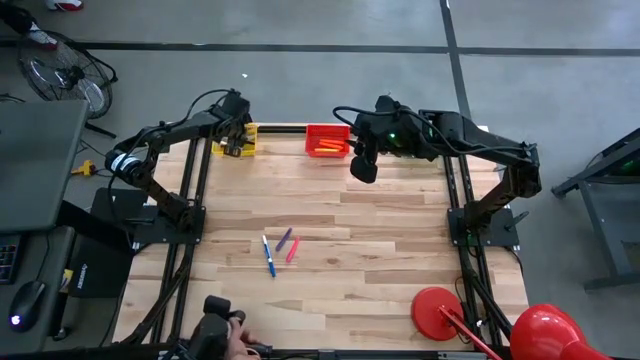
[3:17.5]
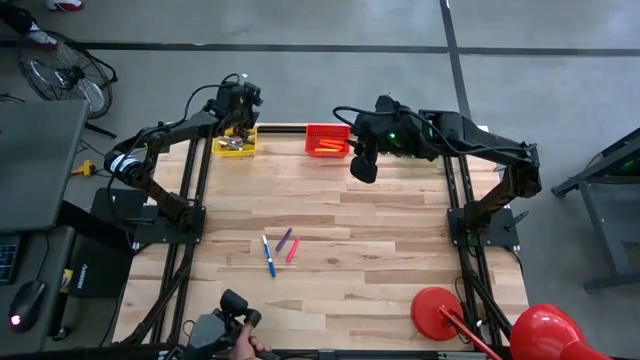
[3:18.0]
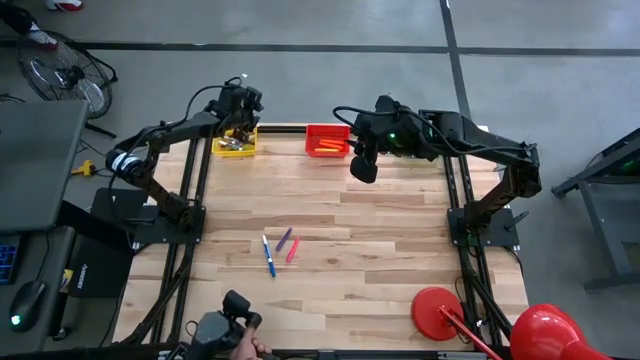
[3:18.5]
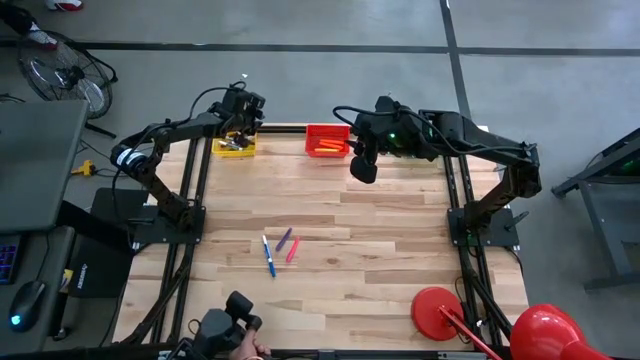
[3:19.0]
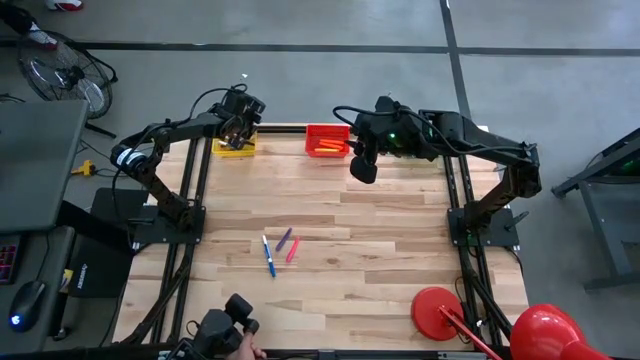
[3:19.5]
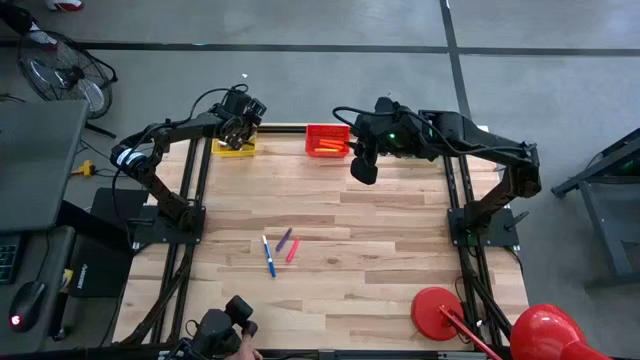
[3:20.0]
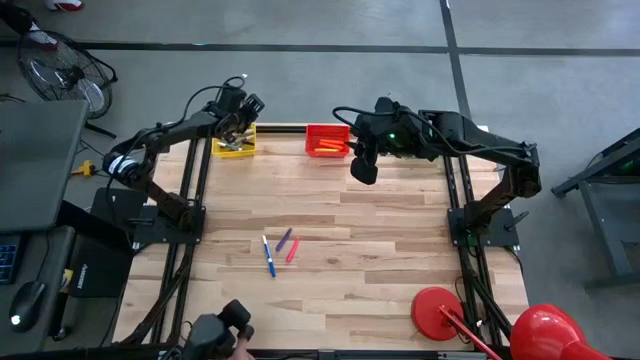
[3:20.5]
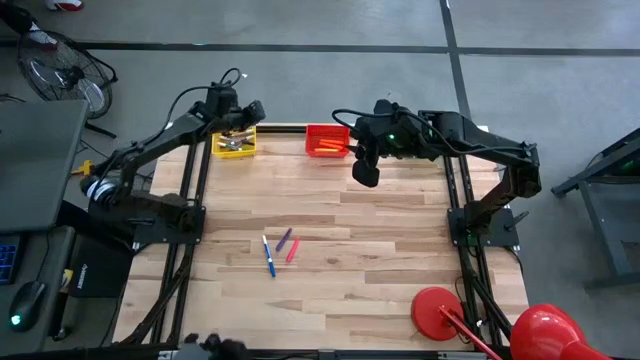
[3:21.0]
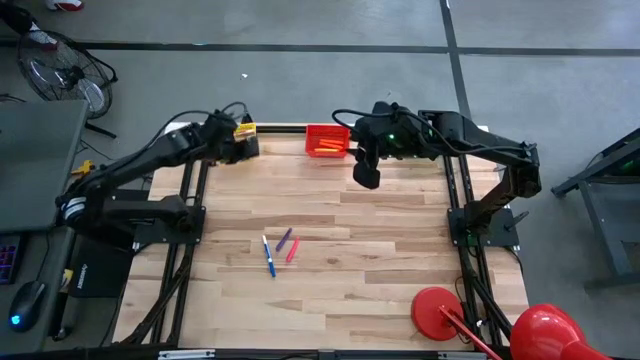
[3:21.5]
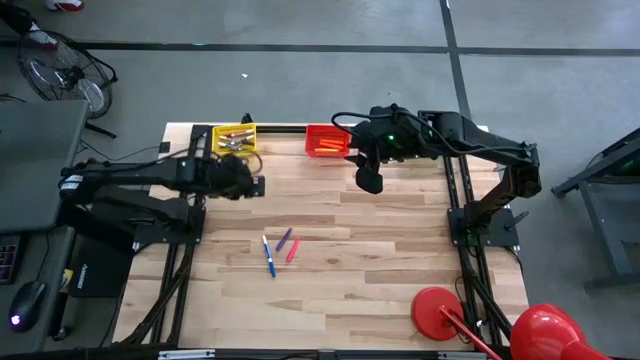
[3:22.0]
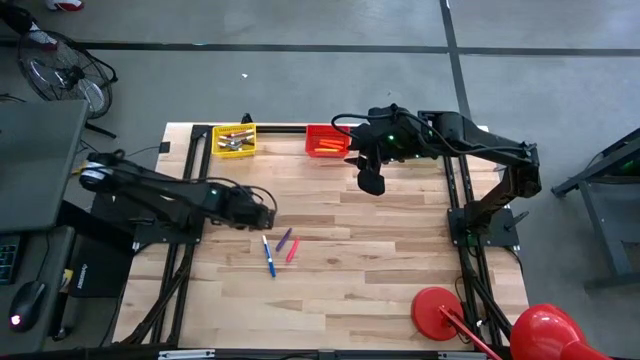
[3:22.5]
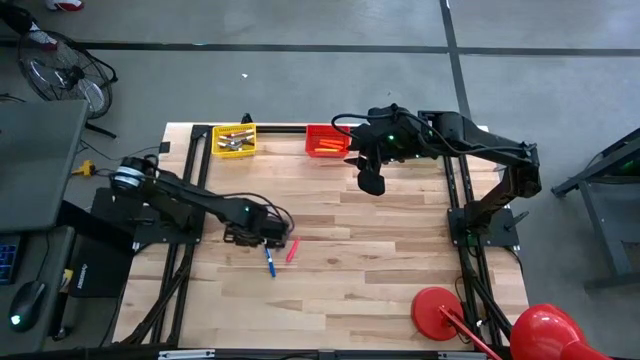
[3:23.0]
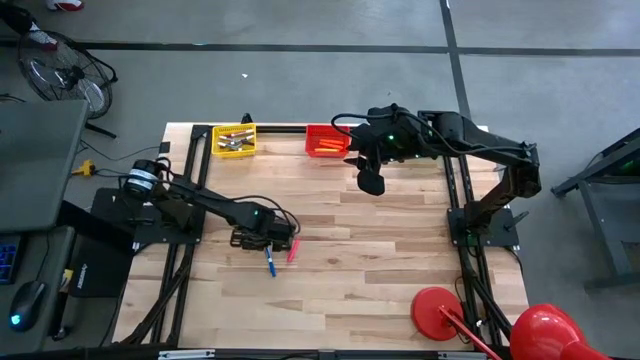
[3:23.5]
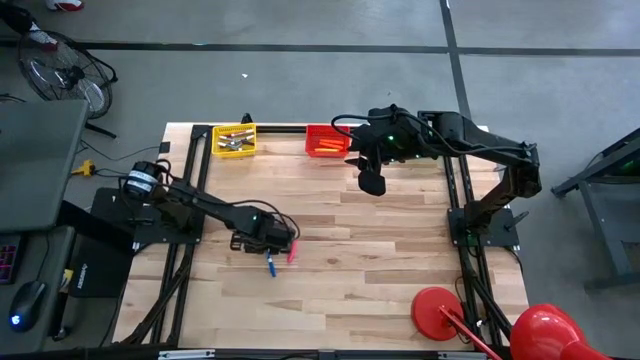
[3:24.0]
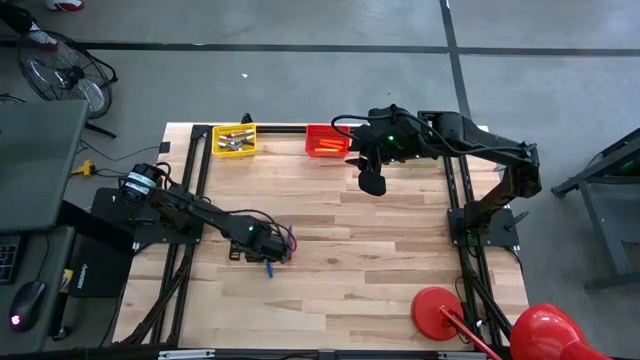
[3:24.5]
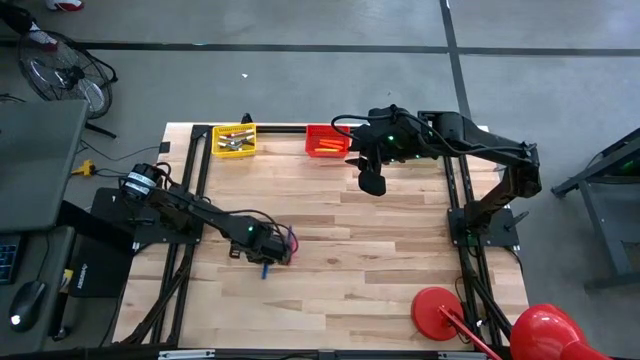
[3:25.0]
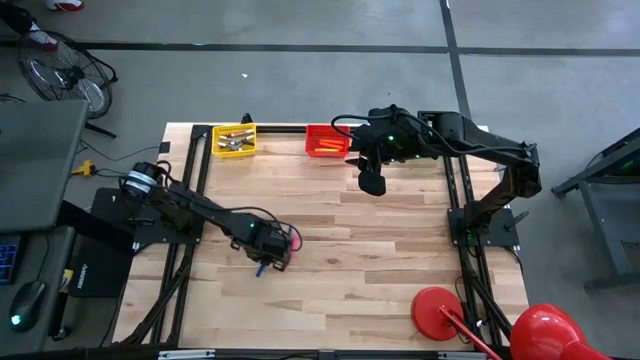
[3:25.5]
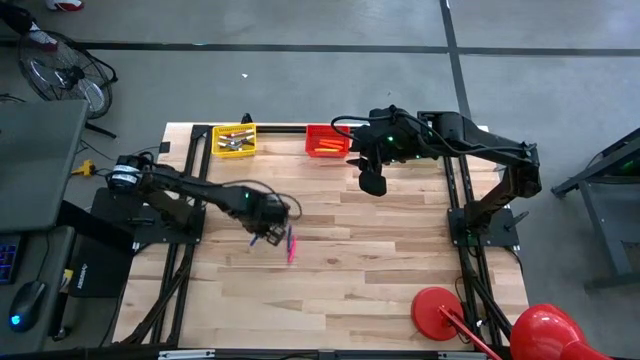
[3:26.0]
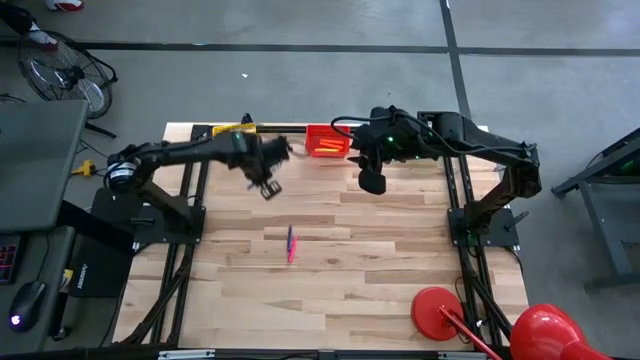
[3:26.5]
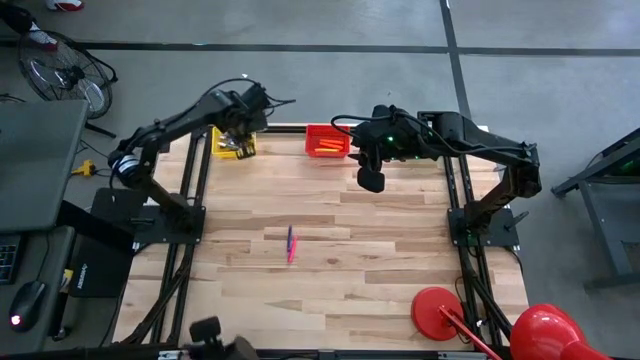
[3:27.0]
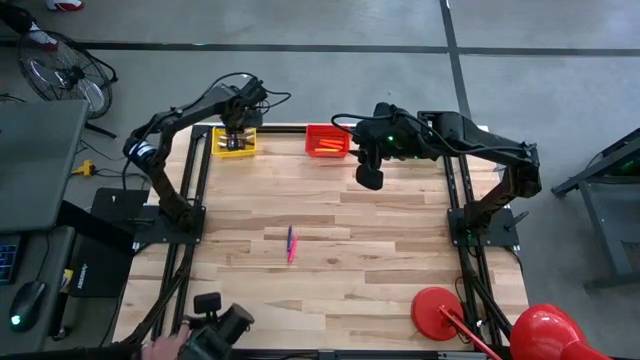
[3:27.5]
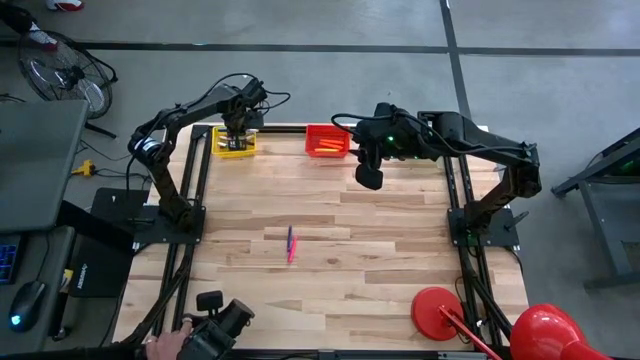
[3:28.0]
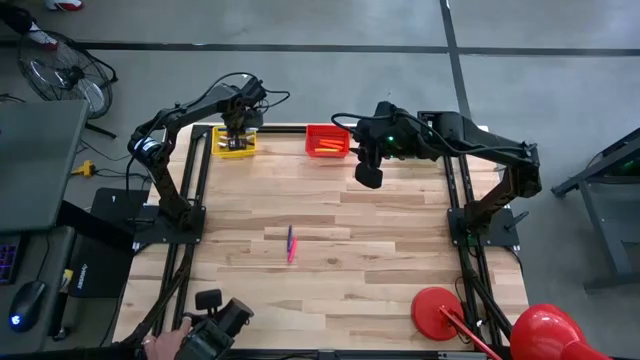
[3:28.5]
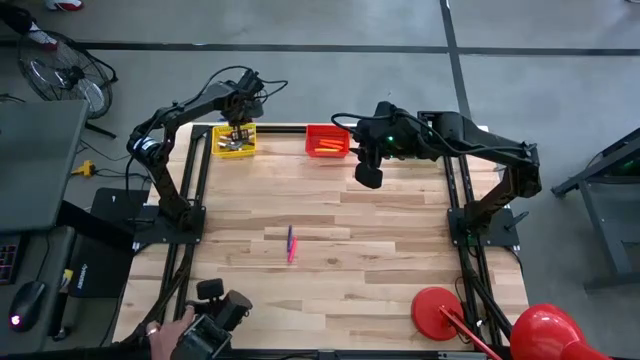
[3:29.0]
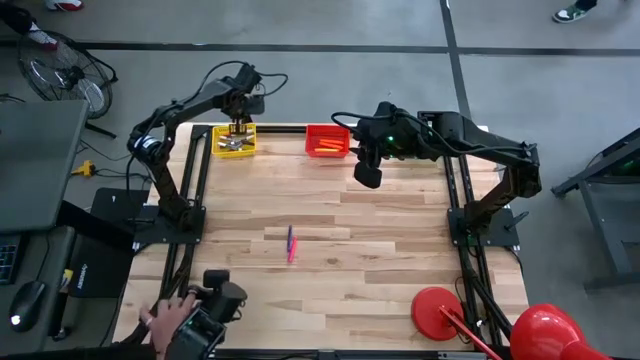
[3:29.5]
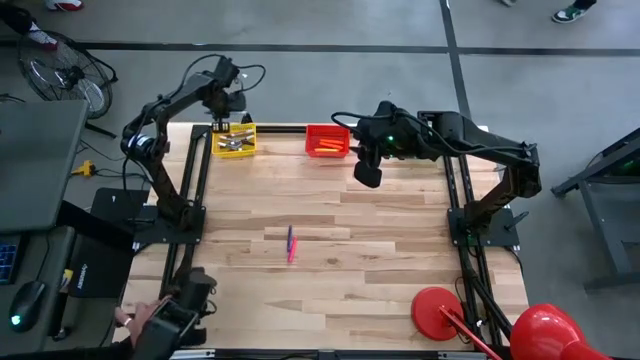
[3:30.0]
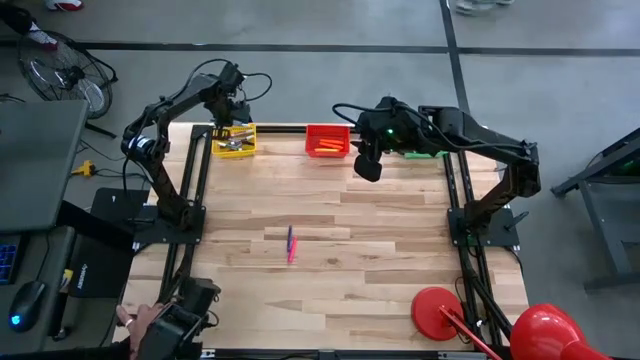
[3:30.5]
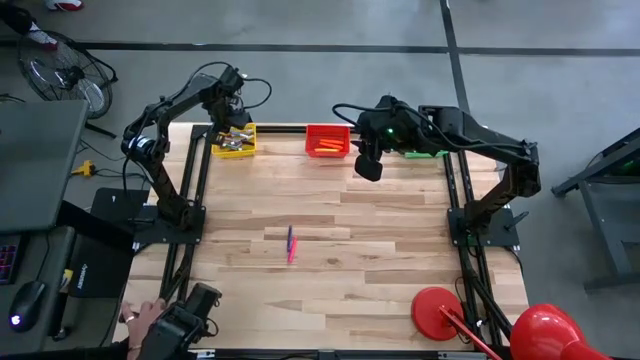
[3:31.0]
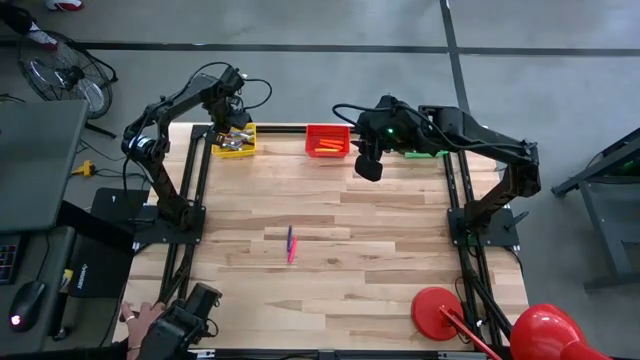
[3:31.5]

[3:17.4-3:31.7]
Task: Pick & Place Markers
Put the blue marker into the yellow bin

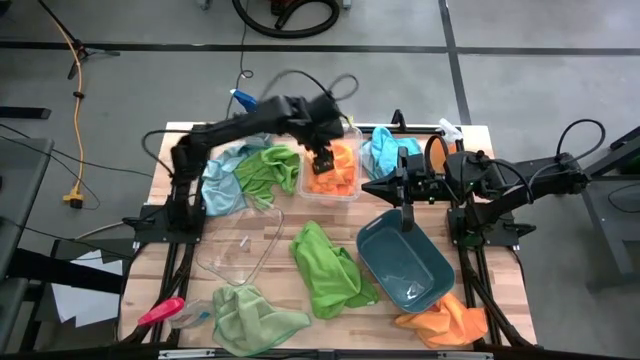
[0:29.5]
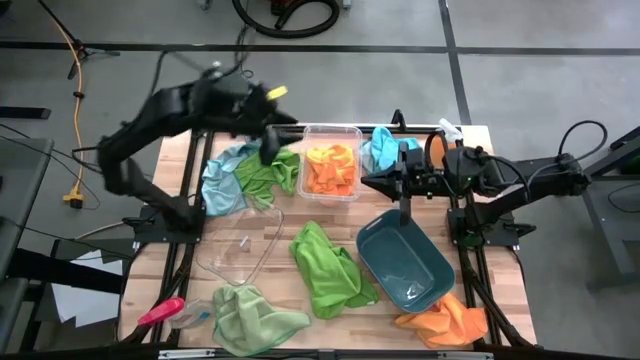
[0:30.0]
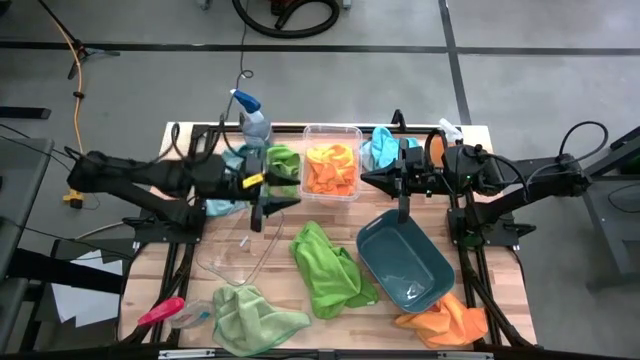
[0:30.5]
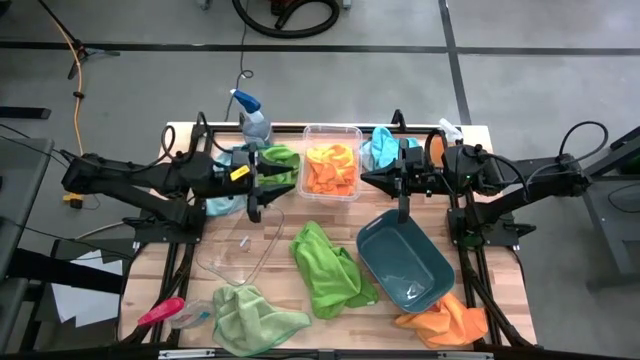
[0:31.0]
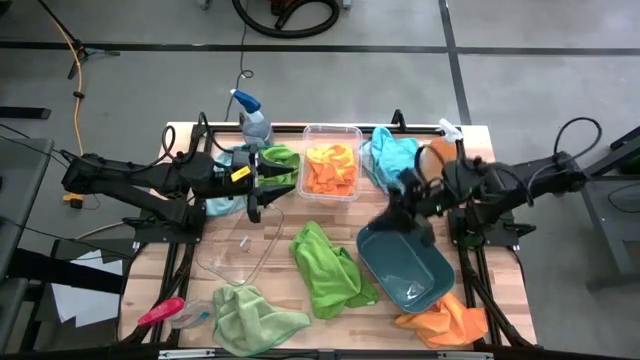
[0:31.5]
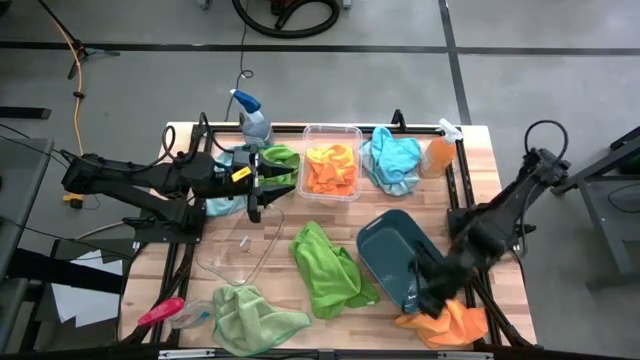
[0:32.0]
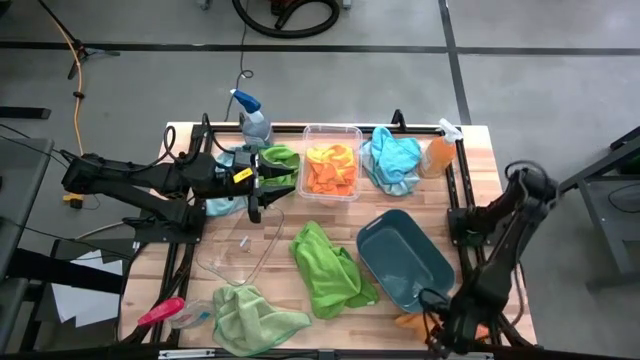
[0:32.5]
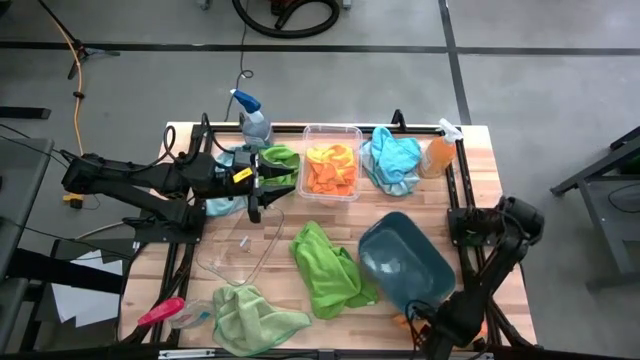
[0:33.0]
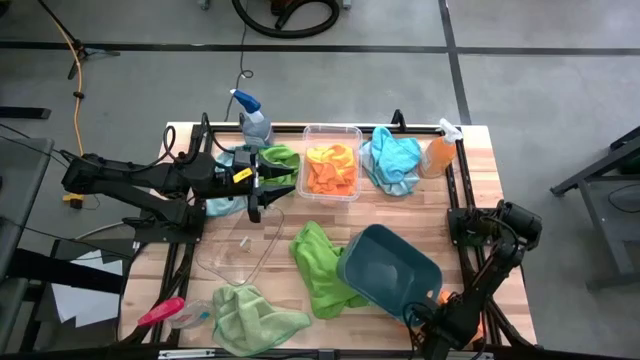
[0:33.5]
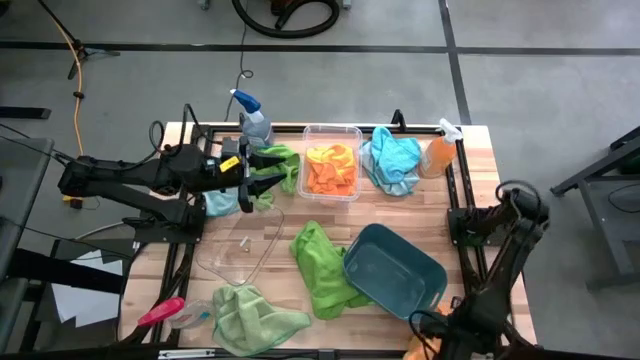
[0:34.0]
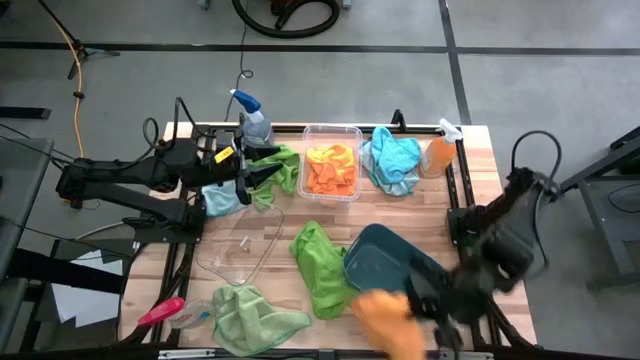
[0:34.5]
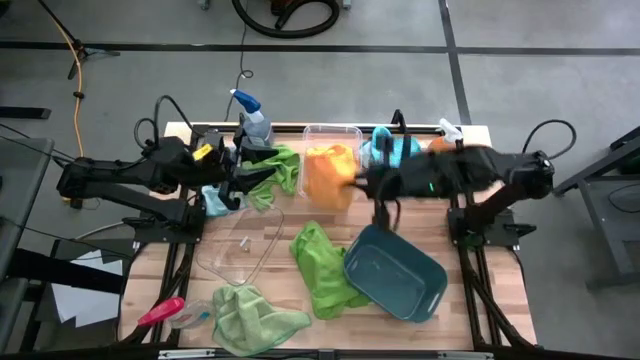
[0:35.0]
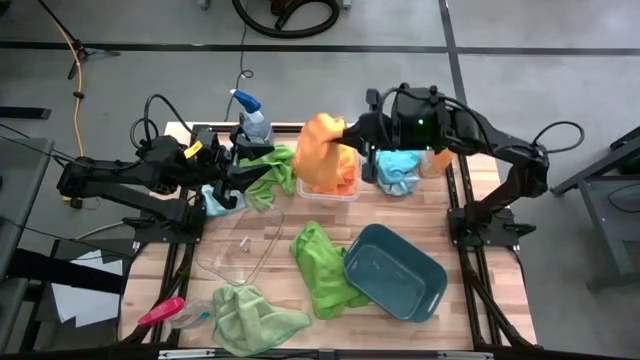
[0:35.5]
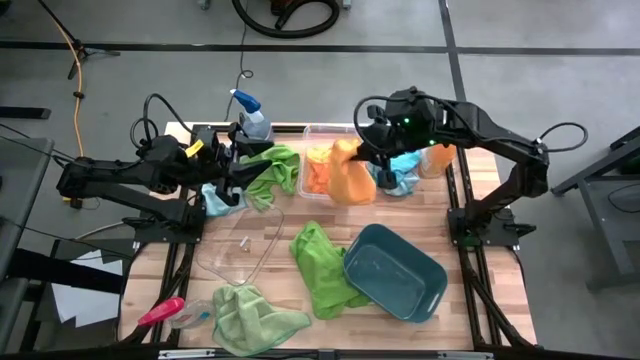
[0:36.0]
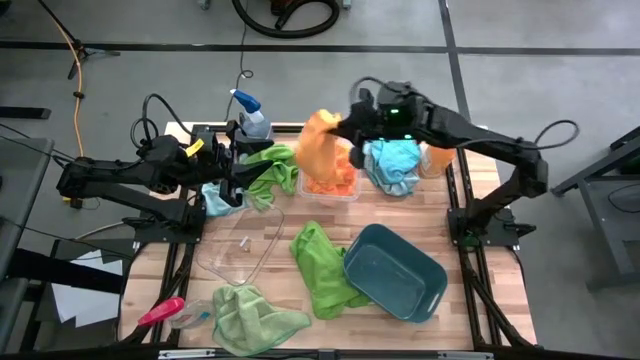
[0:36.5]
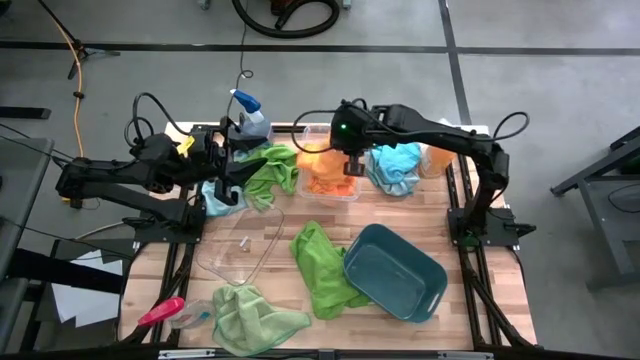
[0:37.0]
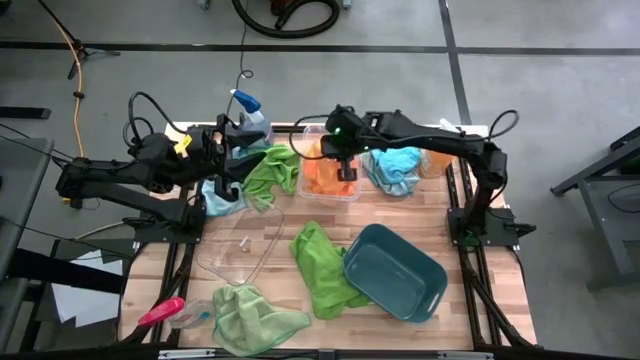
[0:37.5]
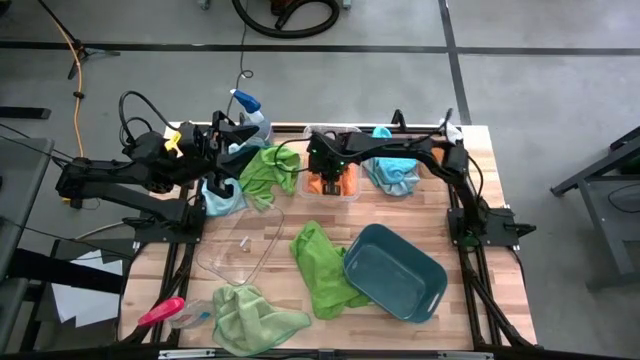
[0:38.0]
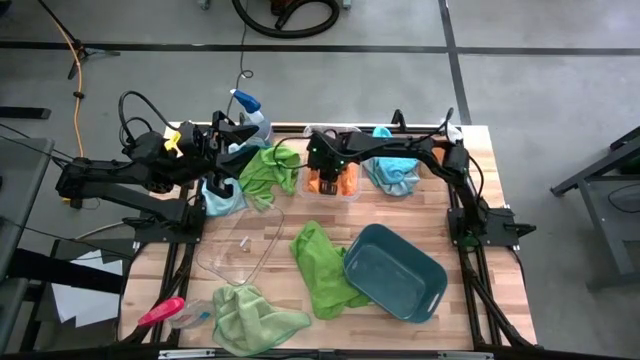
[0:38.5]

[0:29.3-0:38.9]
Task: Sort microfiber towel by color & place in baskets
Put the orange microfiber towel into the top transparent bin
